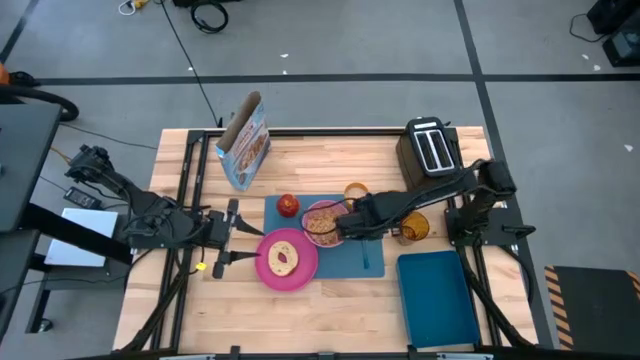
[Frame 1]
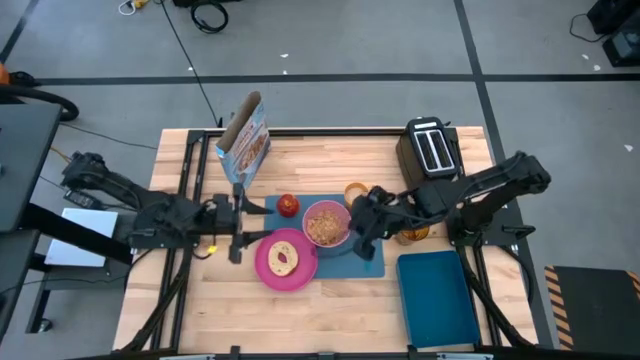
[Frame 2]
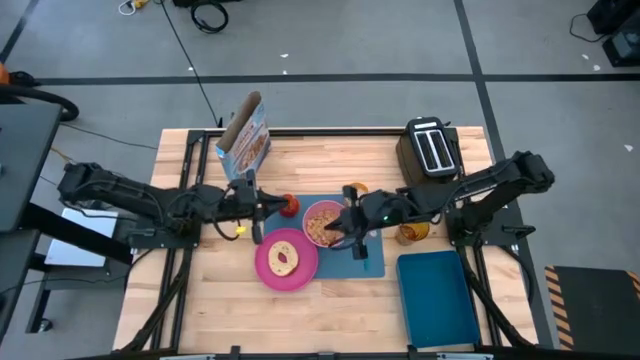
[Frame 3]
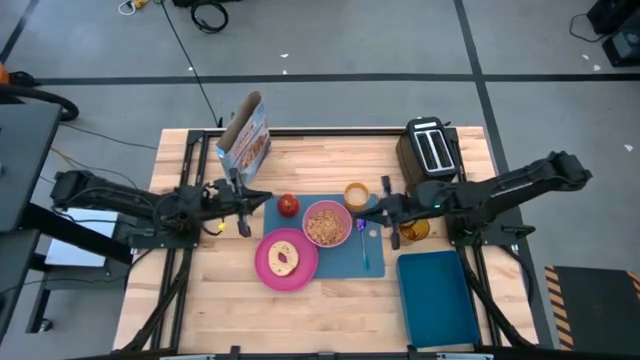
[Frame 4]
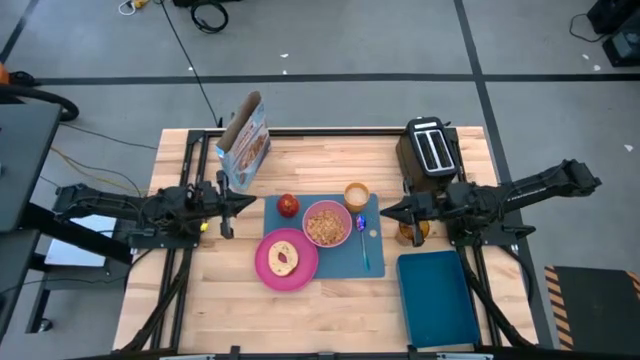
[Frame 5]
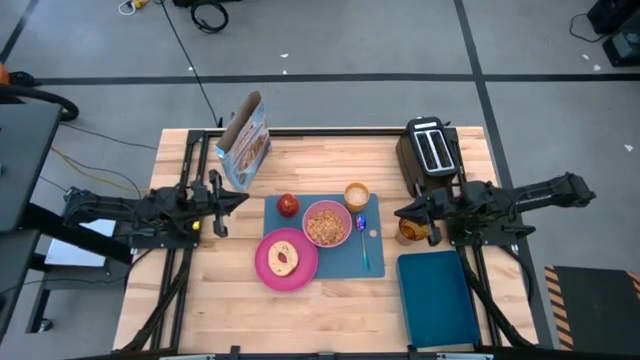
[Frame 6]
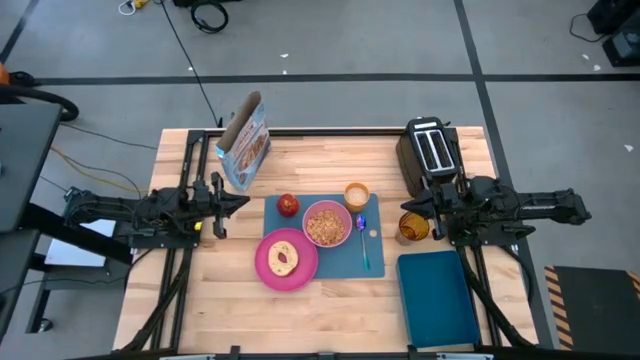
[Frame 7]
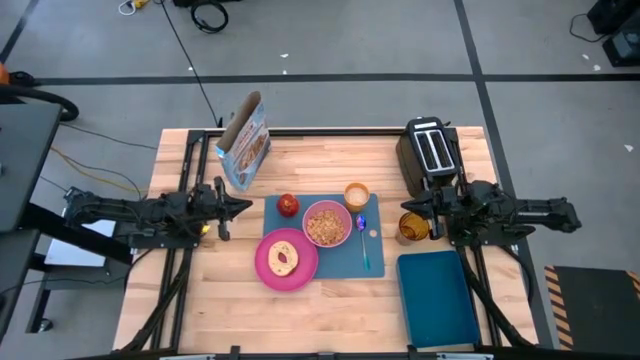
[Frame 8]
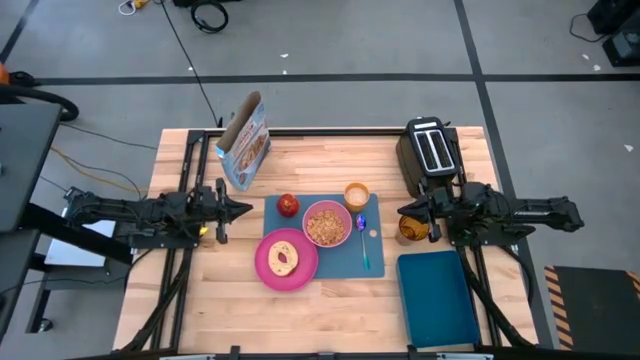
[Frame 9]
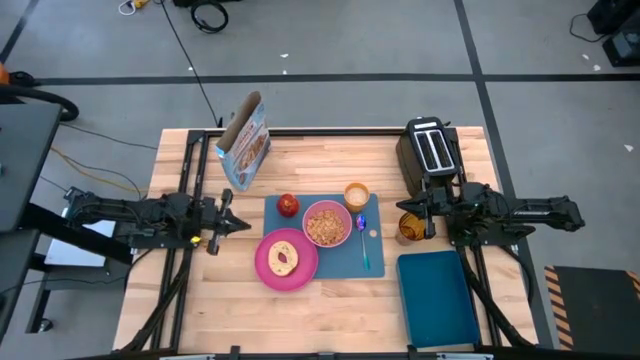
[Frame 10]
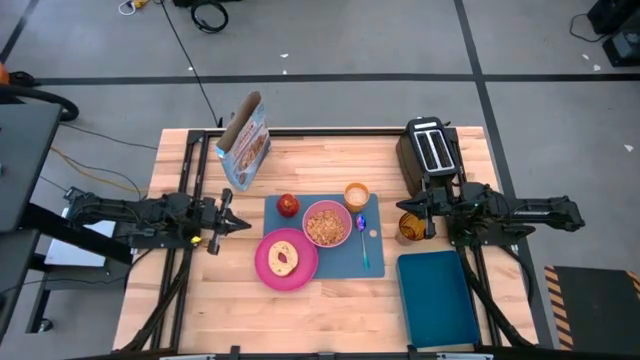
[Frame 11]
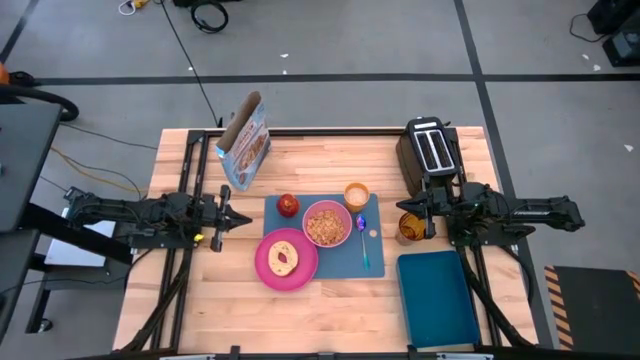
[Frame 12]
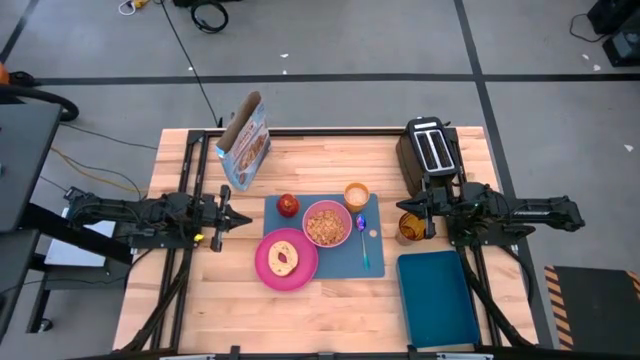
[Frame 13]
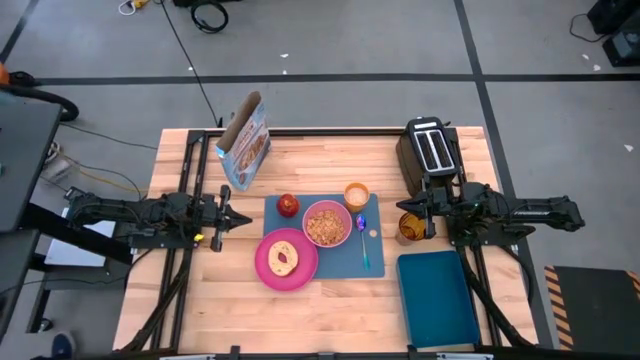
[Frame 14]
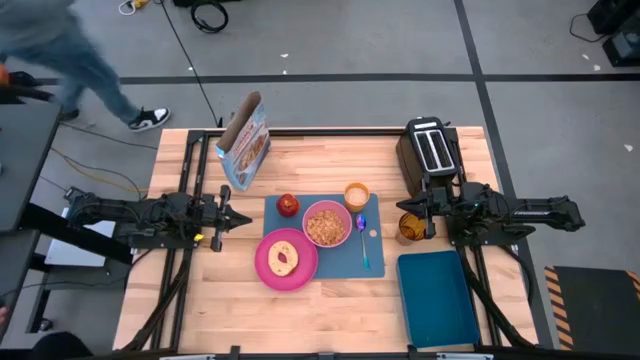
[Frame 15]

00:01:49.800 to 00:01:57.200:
Task: Arrange a breakfast setting
Return to Home Position

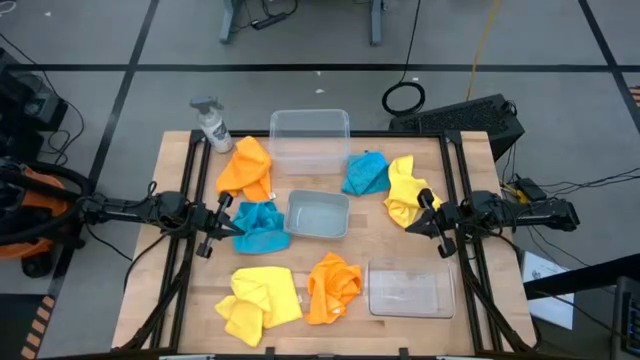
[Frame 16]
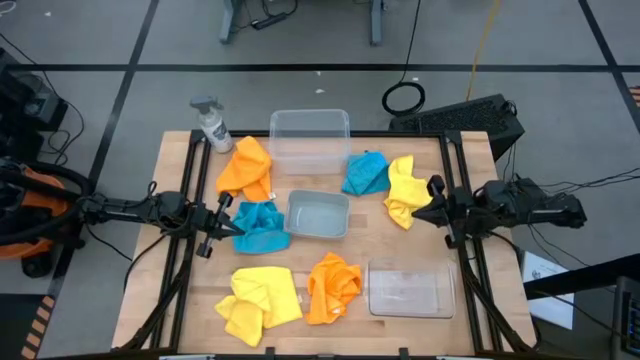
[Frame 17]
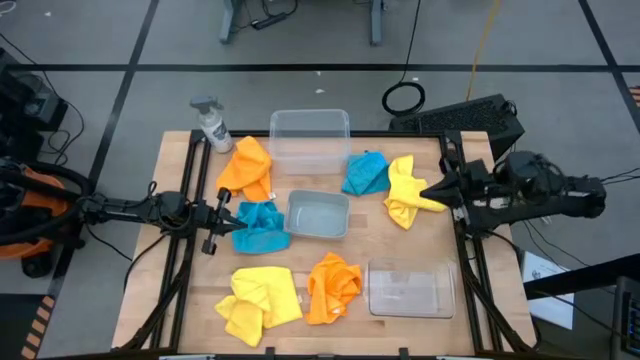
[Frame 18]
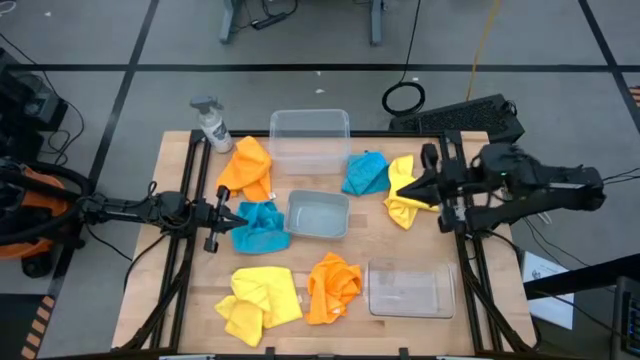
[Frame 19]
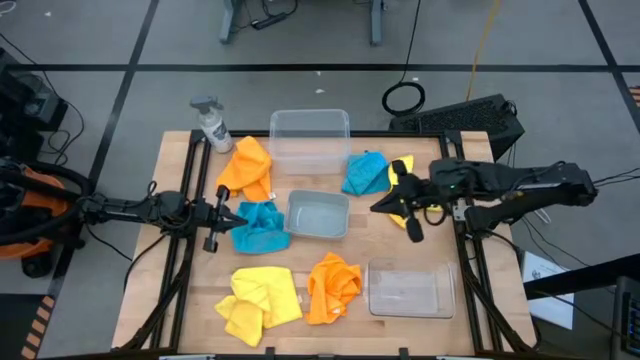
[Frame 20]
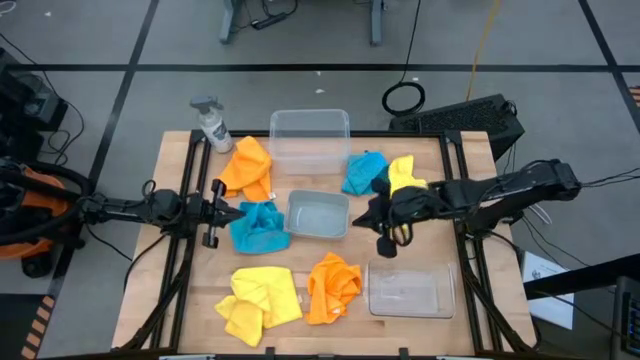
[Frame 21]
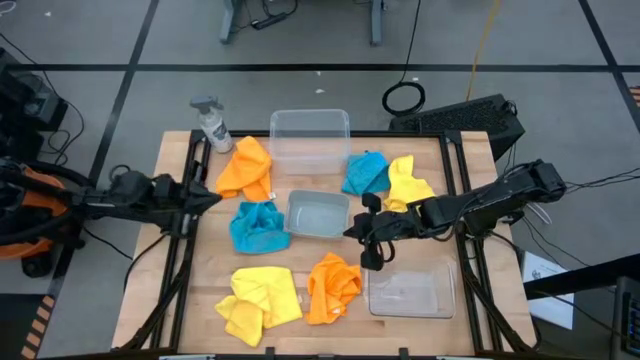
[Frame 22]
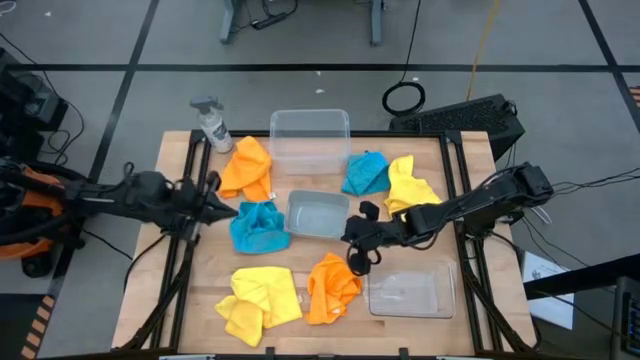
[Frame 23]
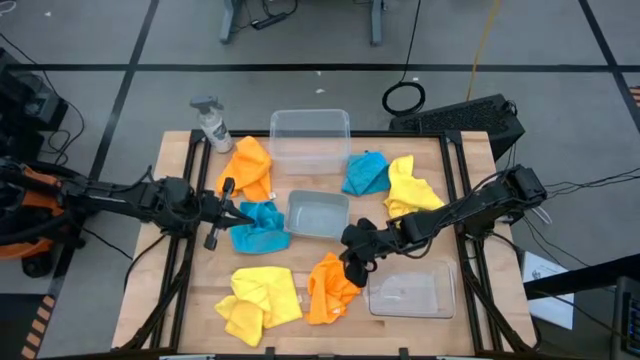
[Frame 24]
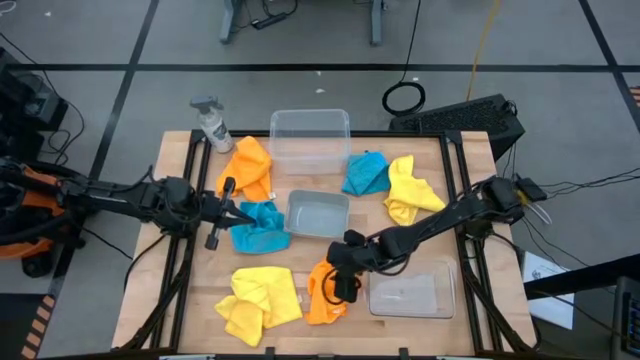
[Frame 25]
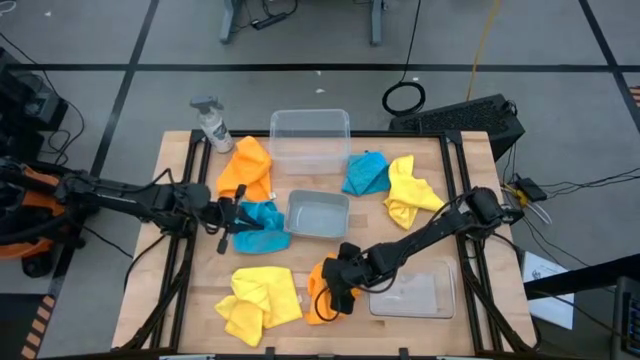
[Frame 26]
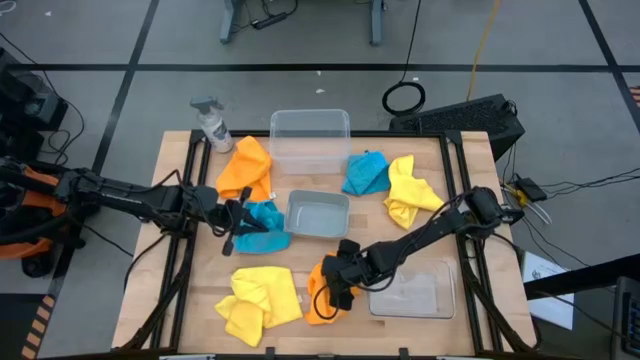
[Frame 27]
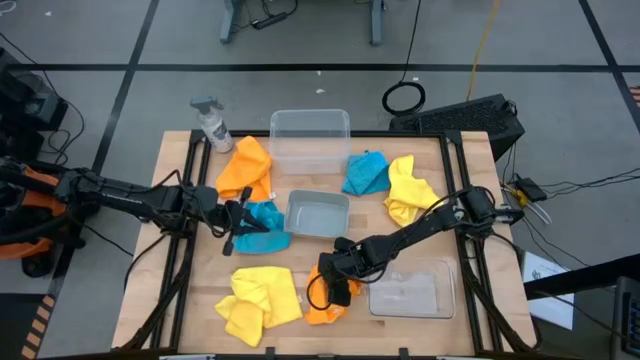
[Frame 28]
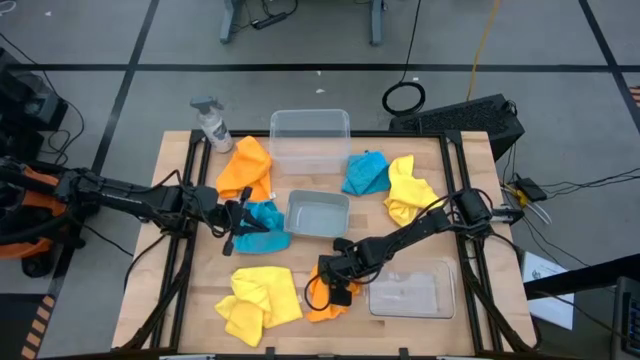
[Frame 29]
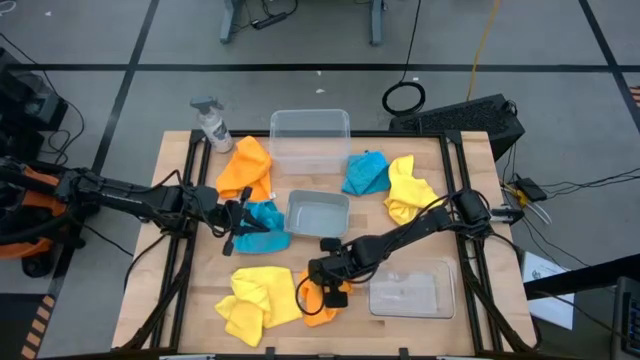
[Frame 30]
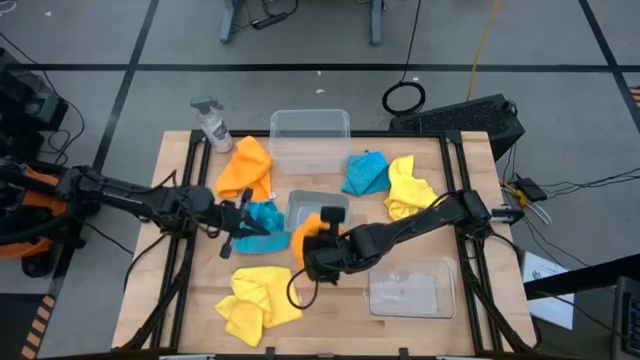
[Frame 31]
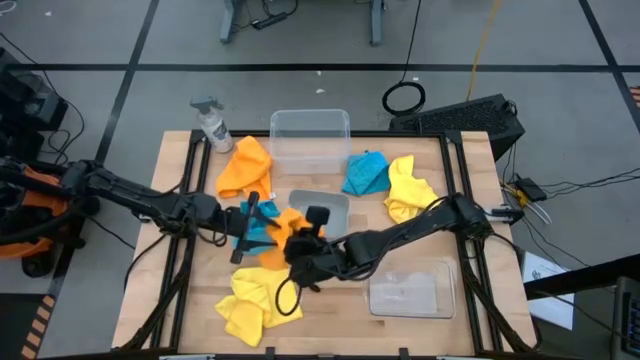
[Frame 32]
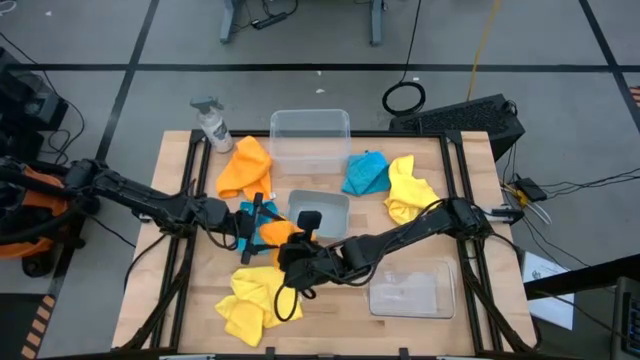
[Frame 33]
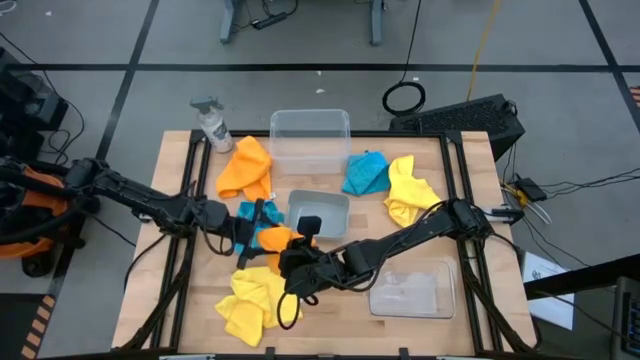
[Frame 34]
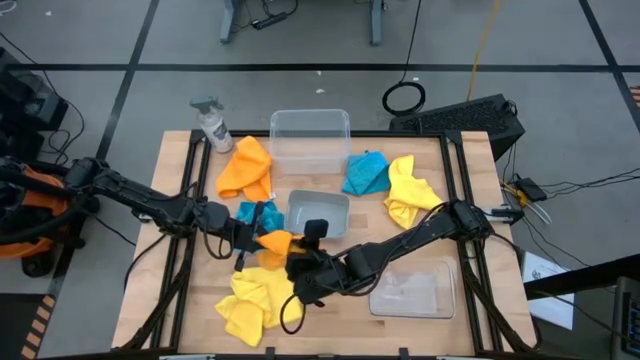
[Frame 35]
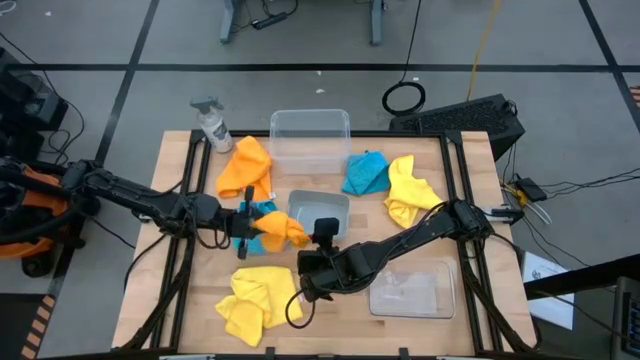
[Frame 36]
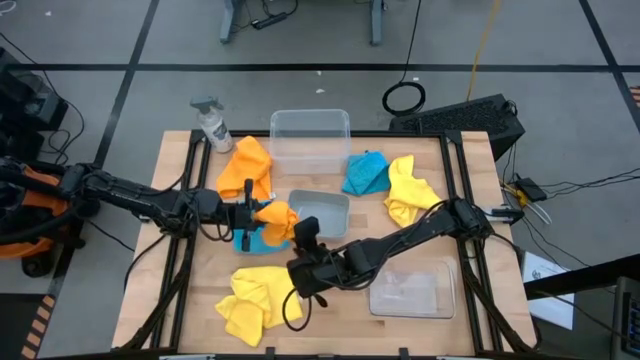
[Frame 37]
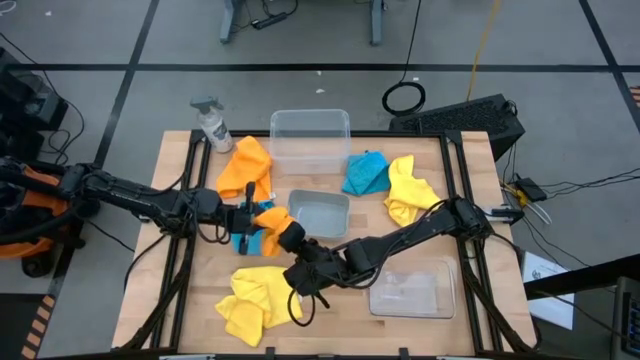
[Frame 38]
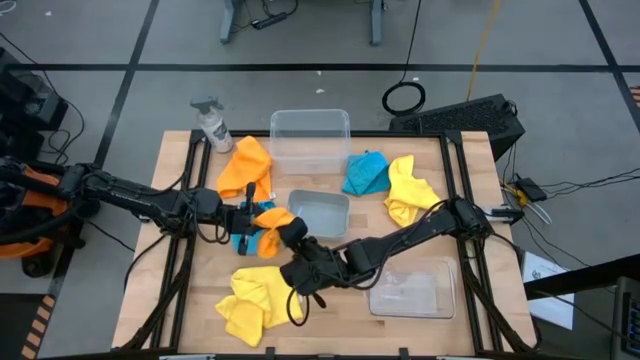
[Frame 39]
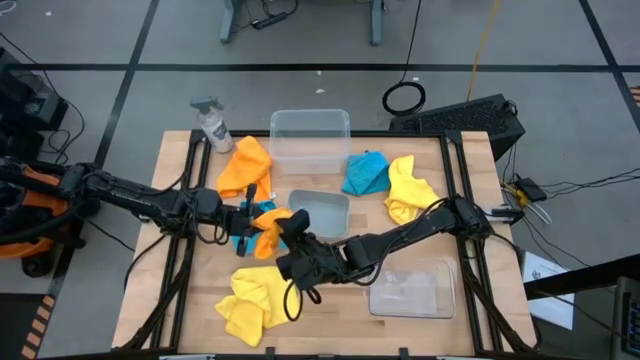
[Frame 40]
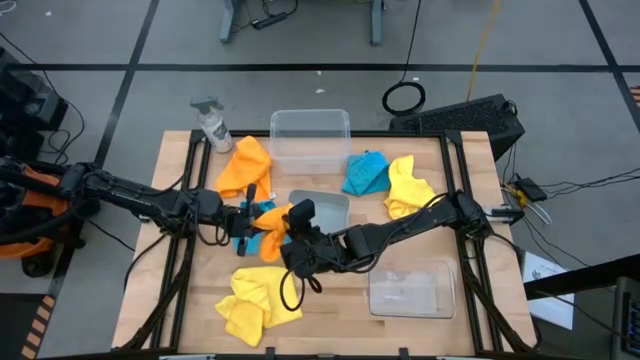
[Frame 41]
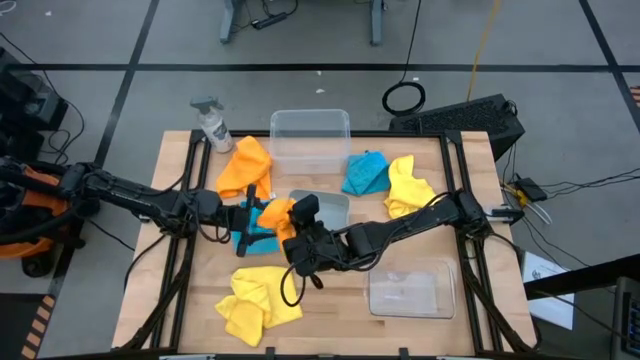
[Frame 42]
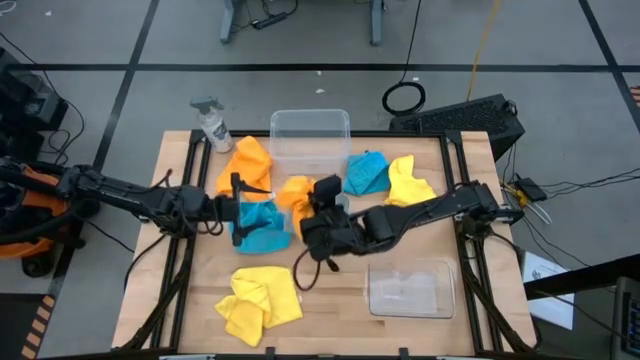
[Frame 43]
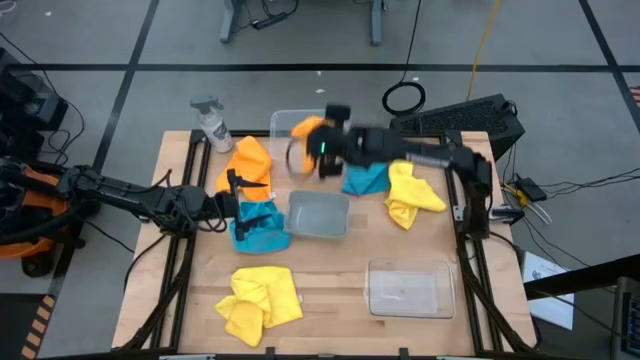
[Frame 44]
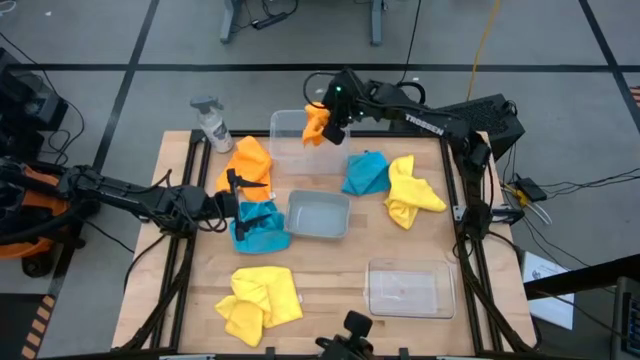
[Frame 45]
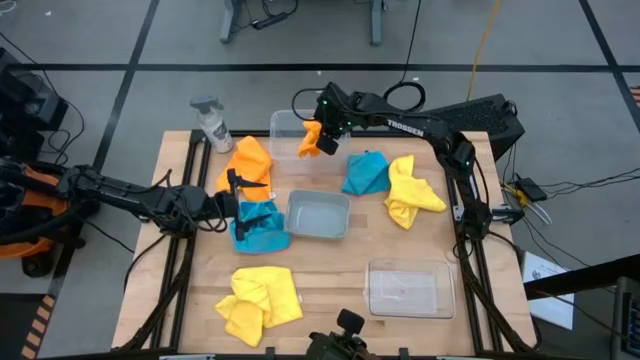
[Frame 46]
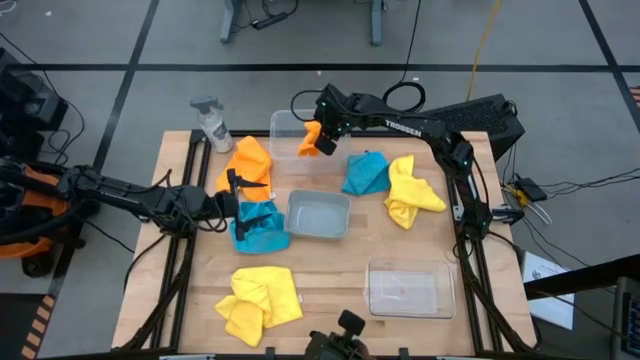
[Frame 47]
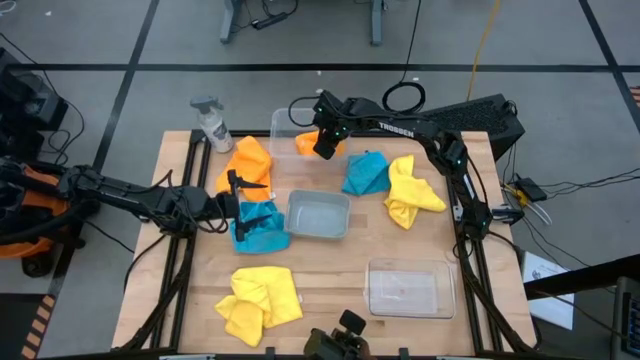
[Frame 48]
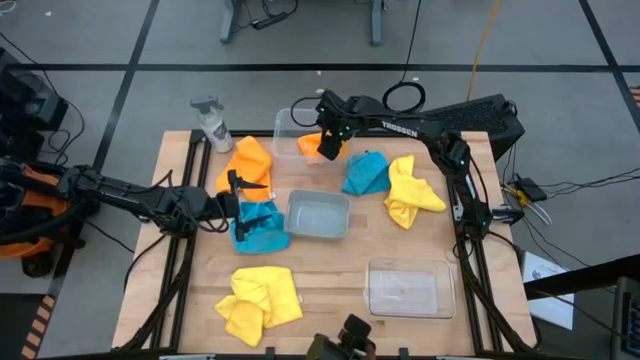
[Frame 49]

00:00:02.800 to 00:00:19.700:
Task: Sort microfiber towel by color & place in baskets
Put the bottom orange microfiber towel into the top transparent bin
